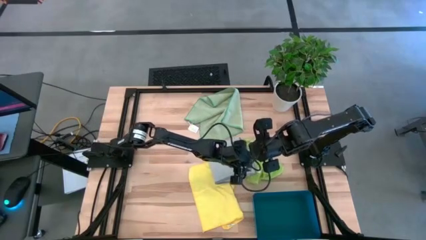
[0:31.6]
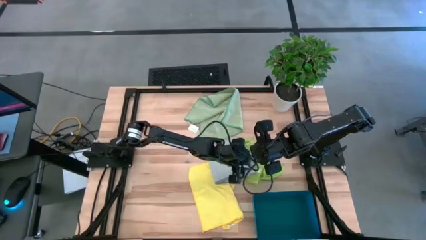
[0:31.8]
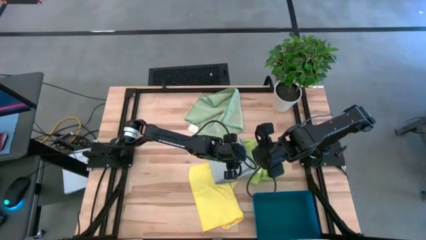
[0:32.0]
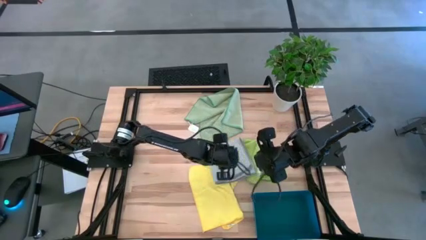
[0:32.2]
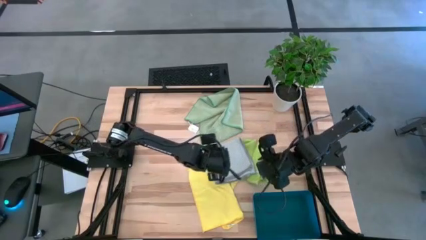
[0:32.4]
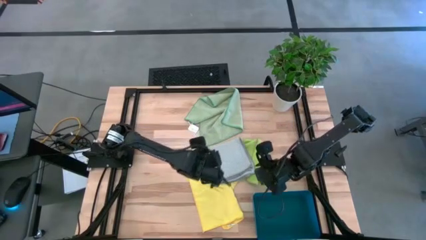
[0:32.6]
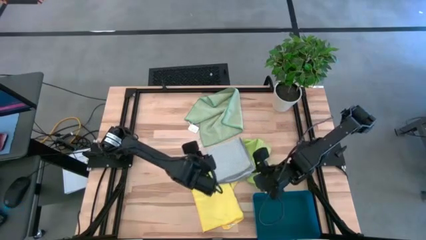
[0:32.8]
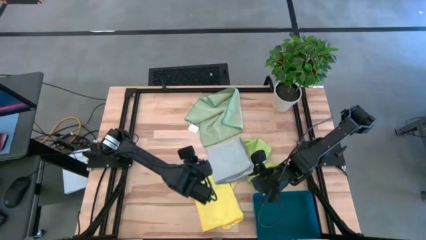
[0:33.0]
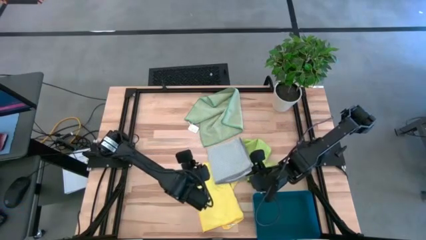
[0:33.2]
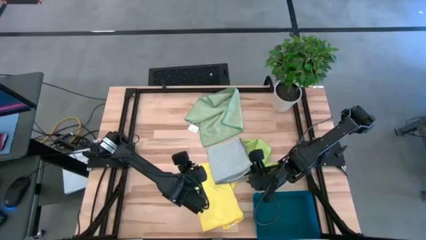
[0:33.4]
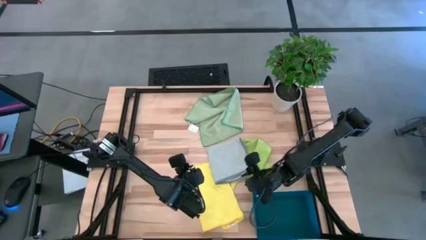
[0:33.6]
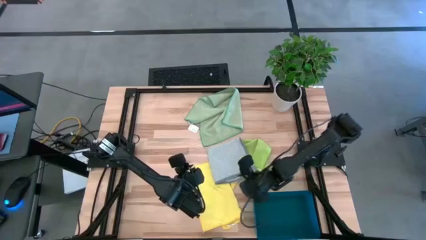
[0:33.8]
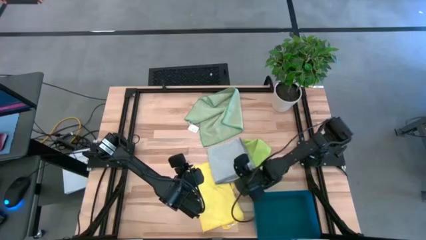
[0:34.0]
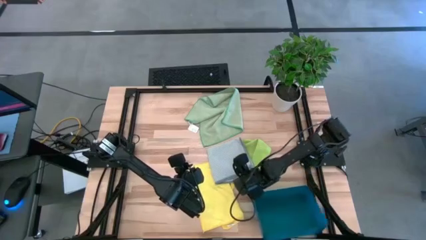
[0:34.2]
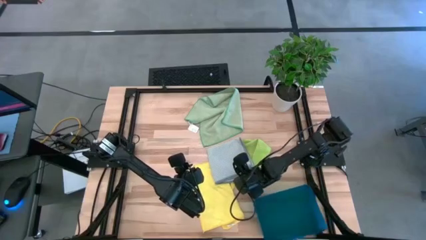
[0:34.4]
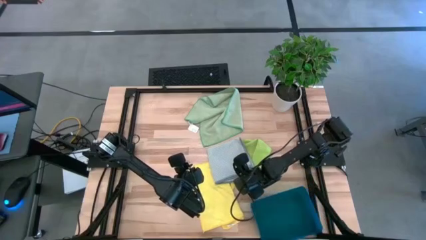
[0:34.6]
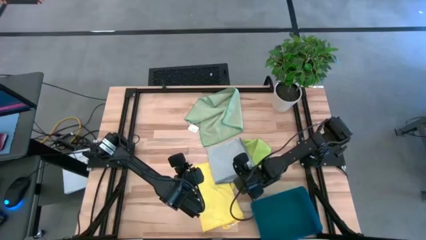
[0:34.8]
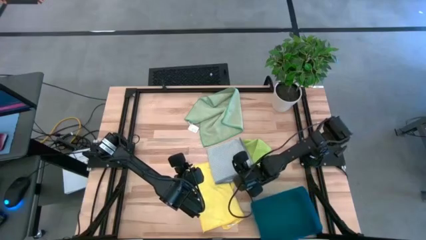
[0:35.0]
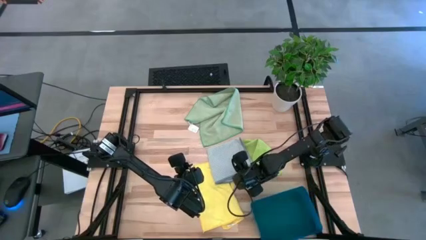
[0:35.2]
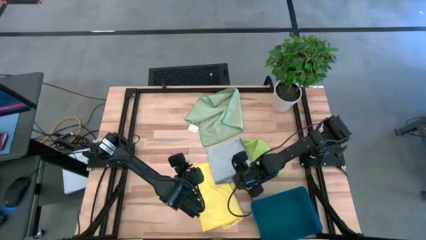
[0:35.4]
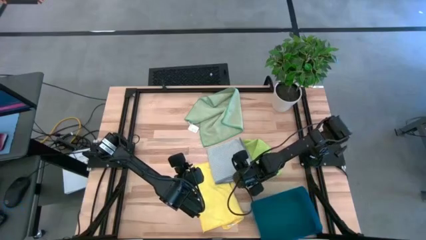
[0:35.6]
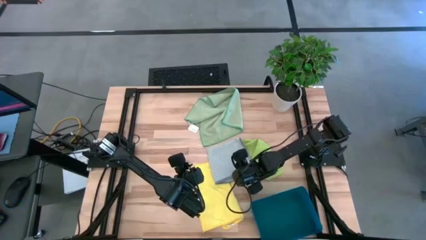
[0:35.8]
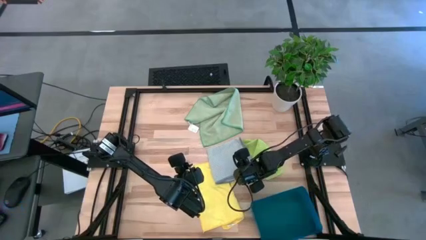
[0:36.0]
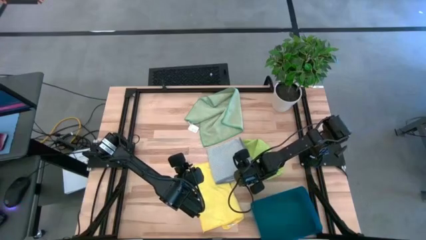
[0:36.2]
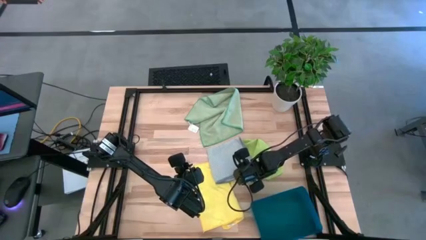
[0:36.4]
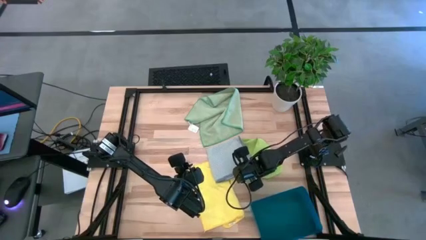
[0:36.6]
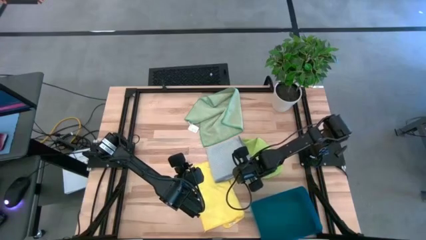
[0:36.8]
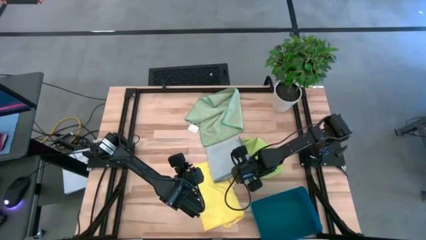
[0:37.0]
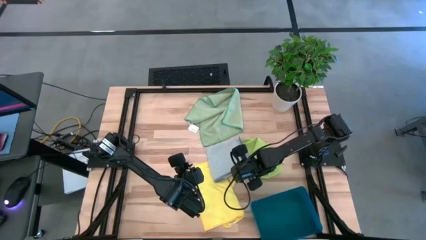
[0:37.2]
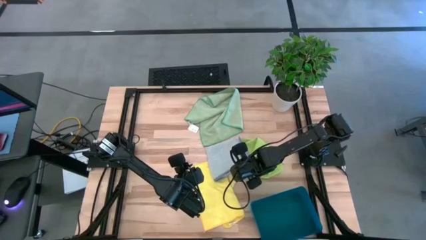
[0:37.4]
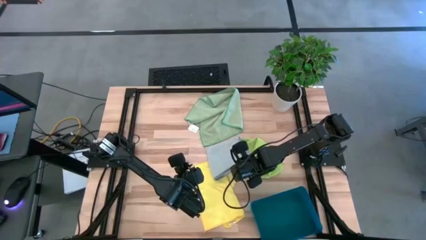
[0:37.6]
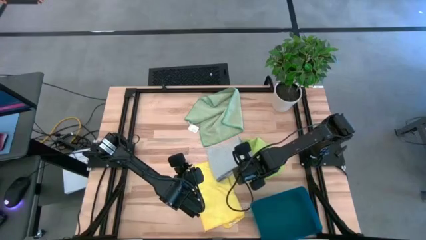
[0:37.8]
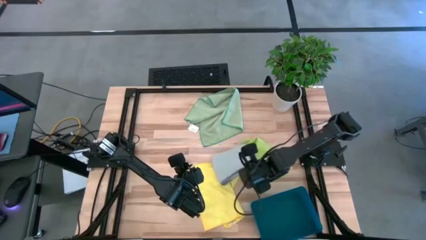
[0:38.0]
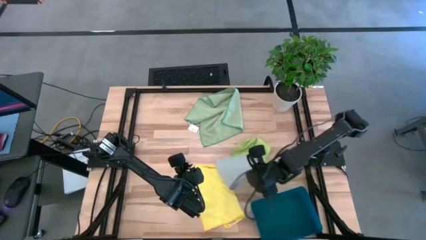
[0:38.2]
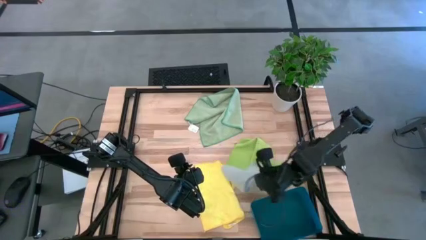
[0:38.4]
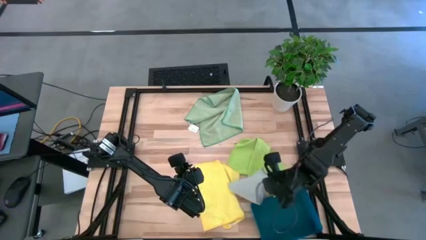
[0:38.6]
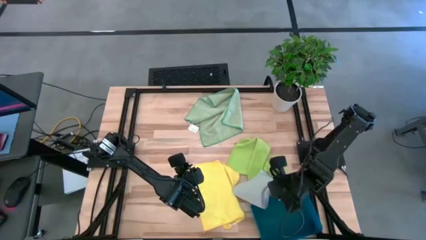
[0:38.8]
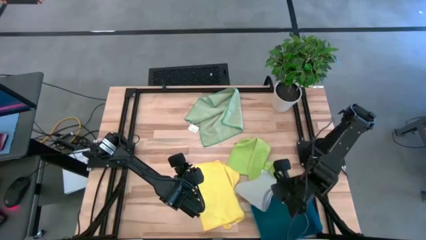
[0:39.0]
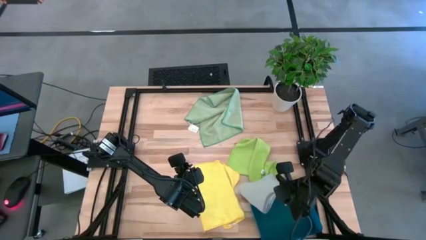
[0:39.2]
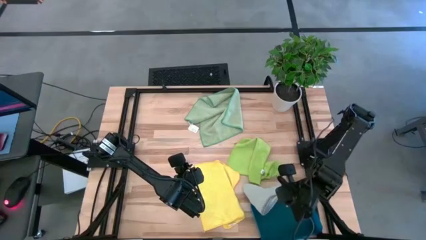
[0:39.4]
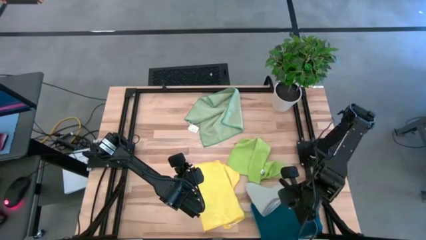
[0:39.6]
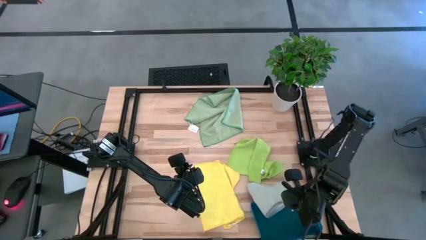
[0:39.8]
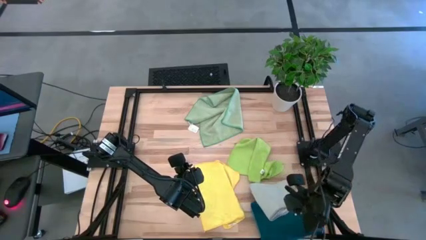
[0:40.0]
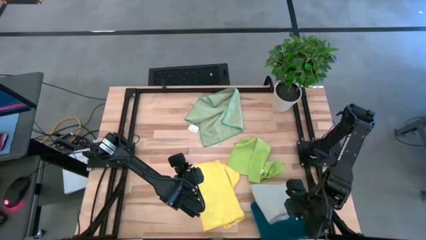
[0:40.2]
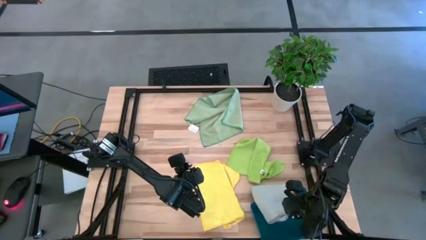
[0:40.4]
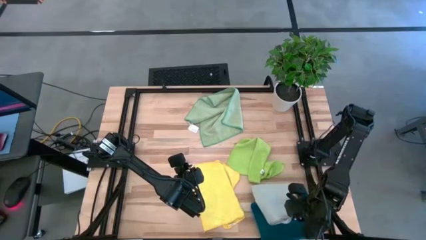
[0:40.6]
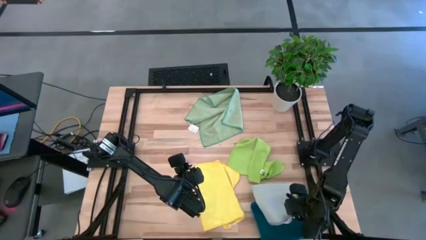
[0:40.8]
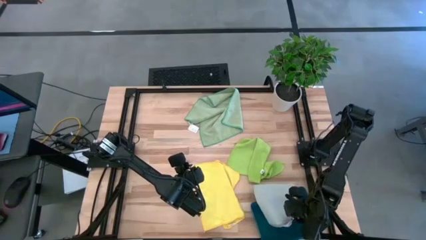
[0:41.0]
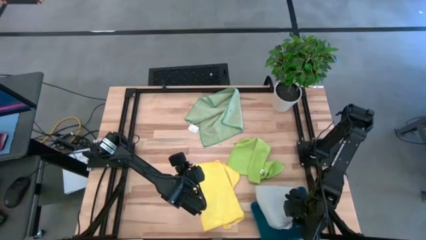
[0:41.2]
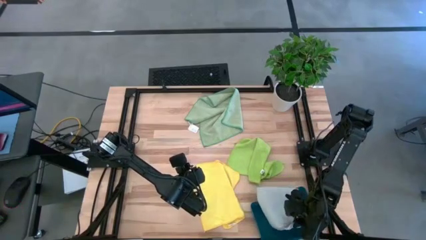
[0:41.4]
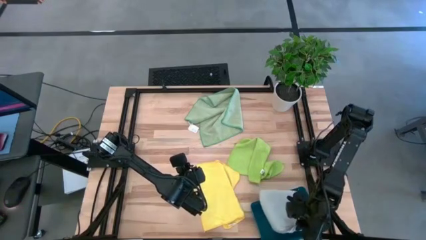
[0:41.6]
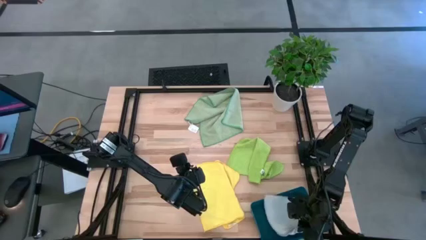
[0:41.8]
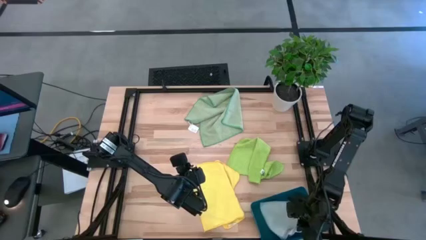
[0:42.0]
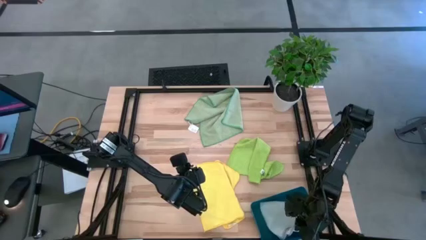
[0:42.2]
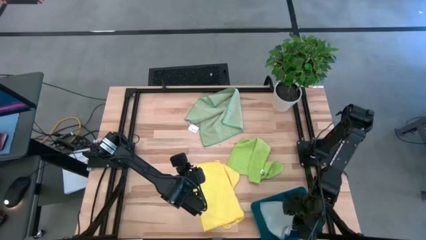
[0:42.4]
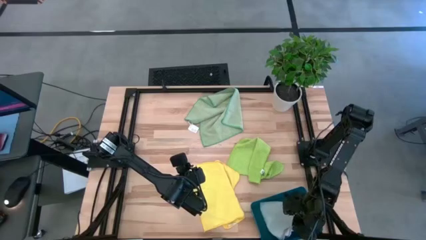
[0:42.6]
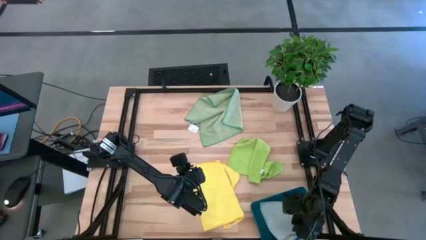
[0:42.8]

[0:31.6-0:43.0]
Task: Fold microfiber towels
Put the gray towel in the bin
